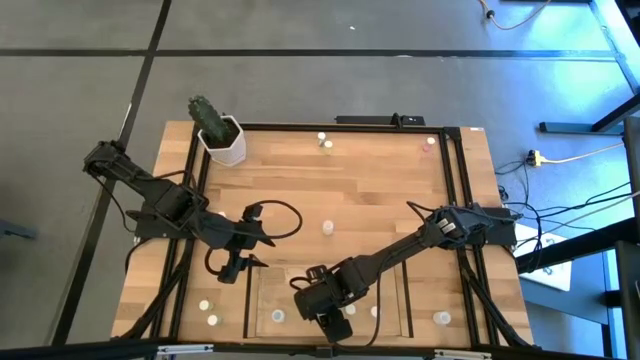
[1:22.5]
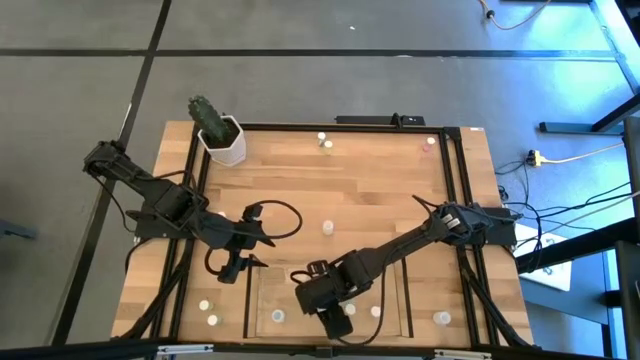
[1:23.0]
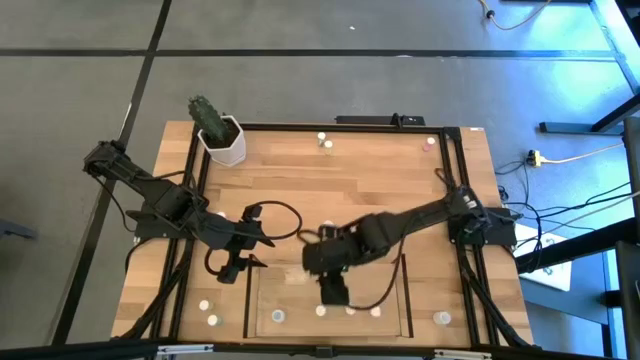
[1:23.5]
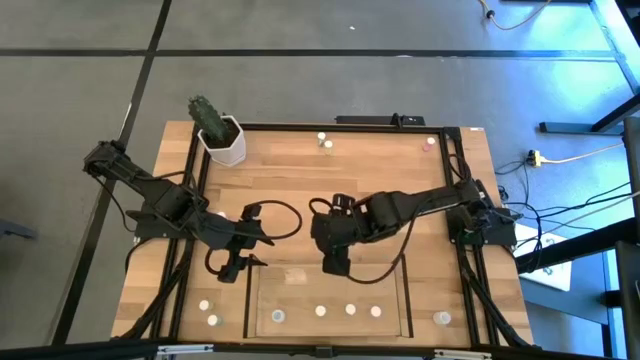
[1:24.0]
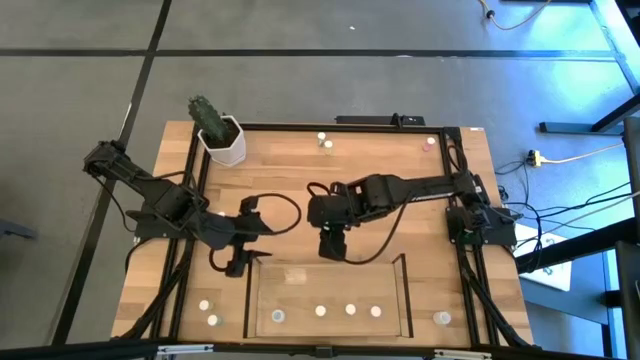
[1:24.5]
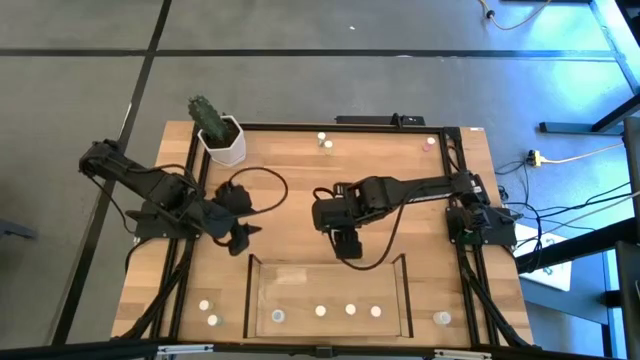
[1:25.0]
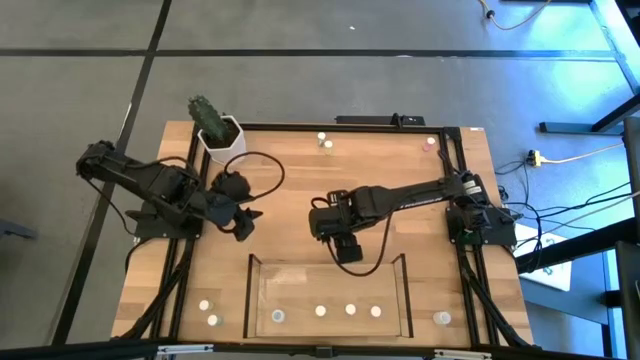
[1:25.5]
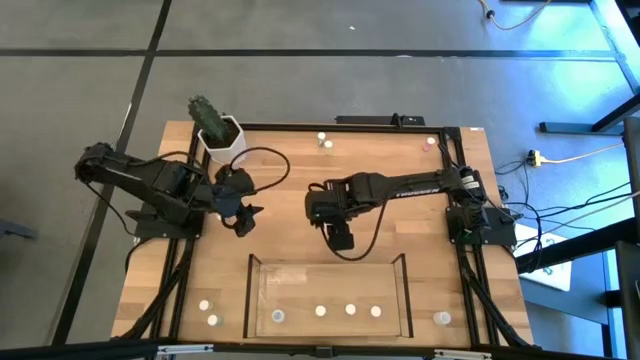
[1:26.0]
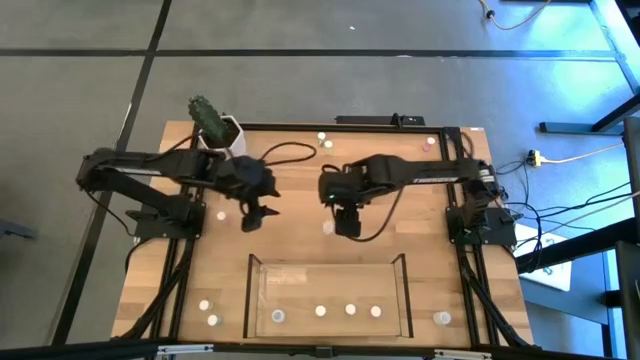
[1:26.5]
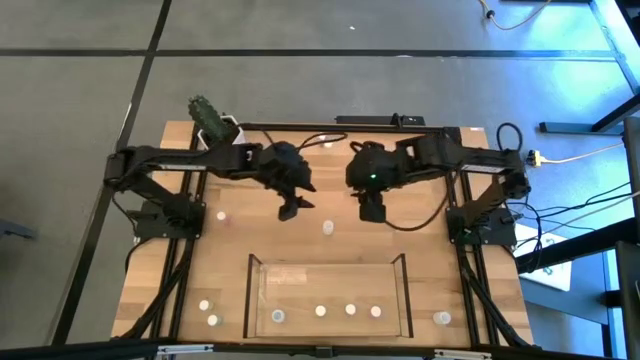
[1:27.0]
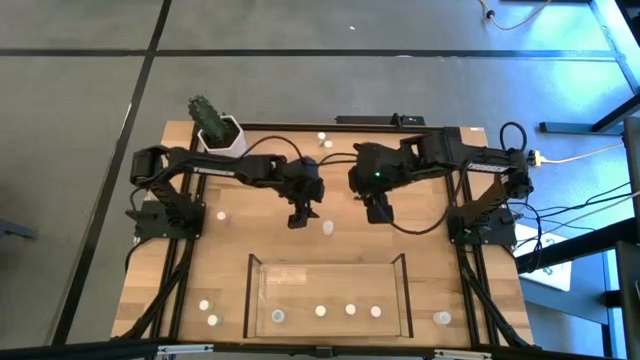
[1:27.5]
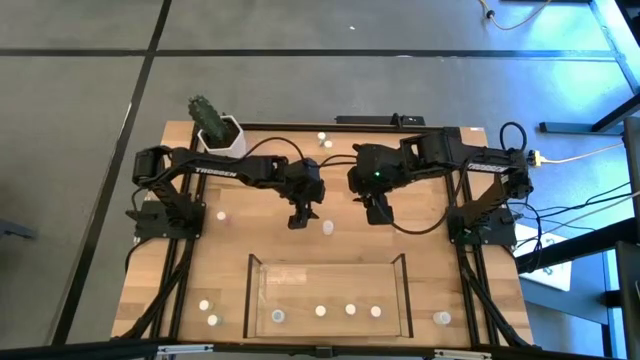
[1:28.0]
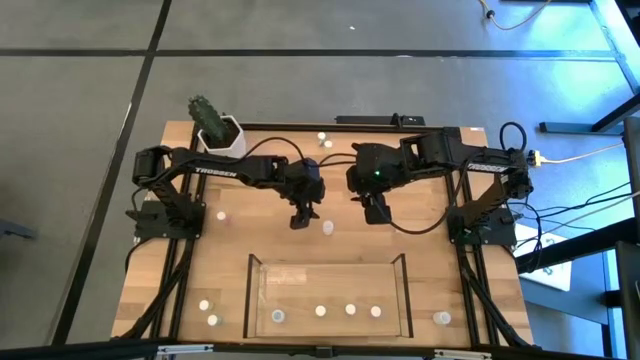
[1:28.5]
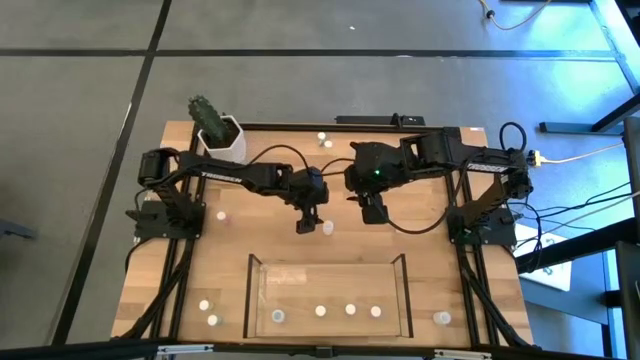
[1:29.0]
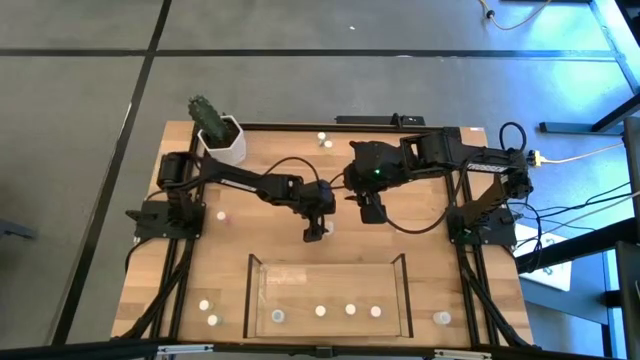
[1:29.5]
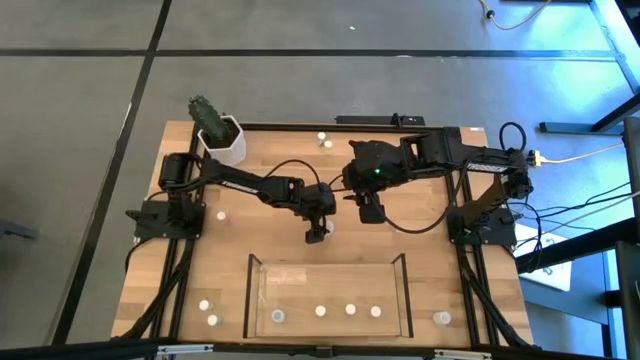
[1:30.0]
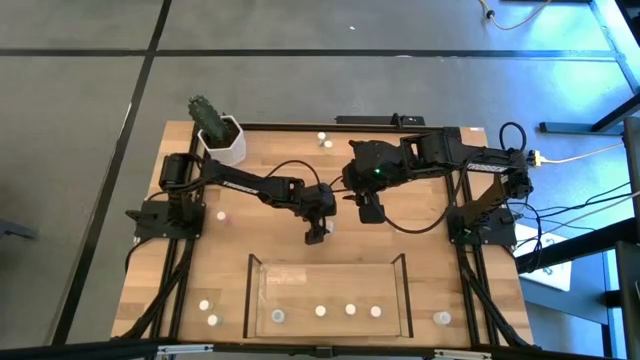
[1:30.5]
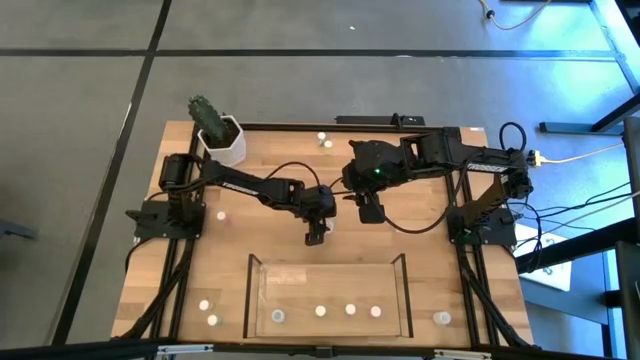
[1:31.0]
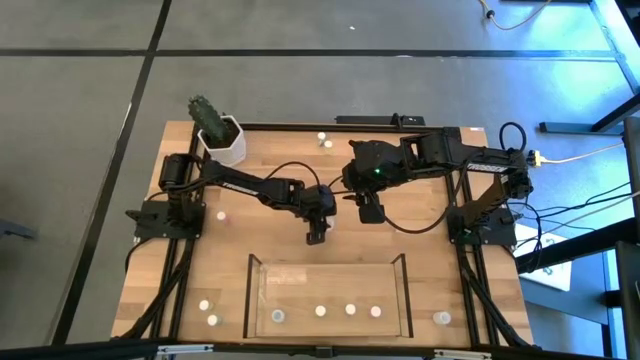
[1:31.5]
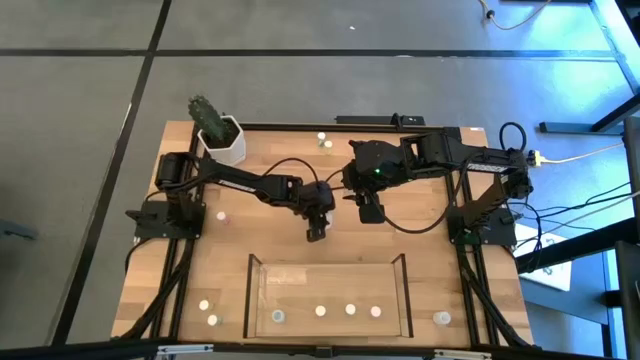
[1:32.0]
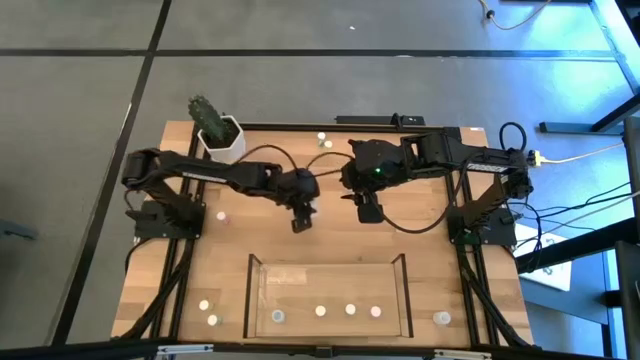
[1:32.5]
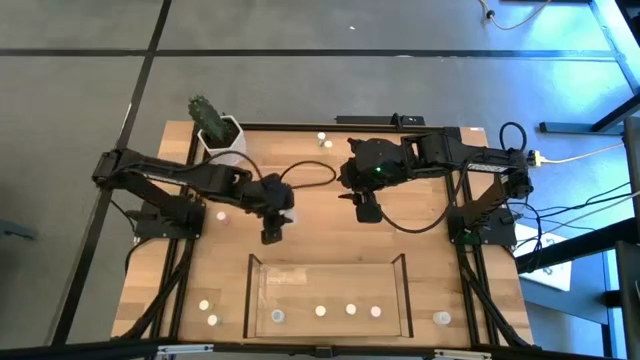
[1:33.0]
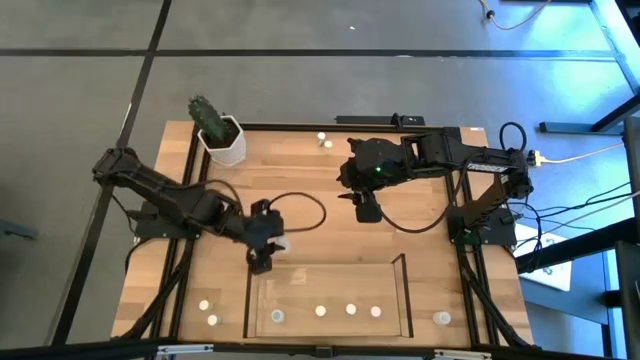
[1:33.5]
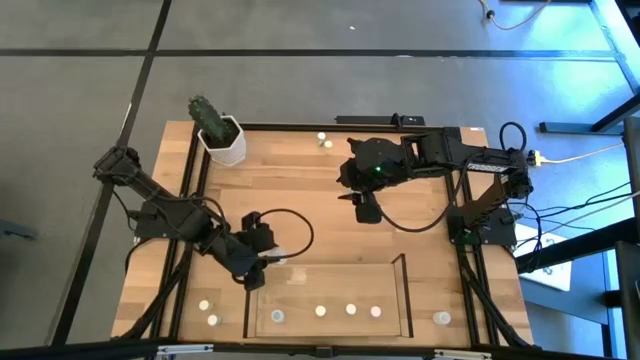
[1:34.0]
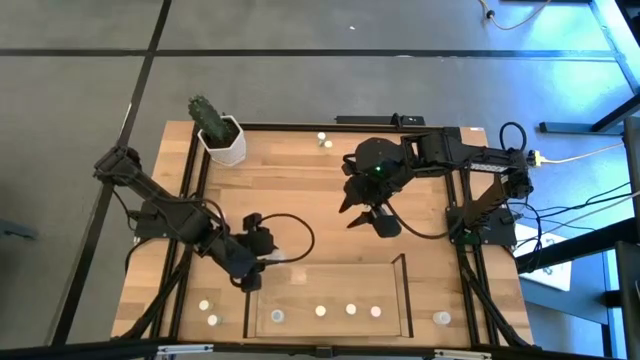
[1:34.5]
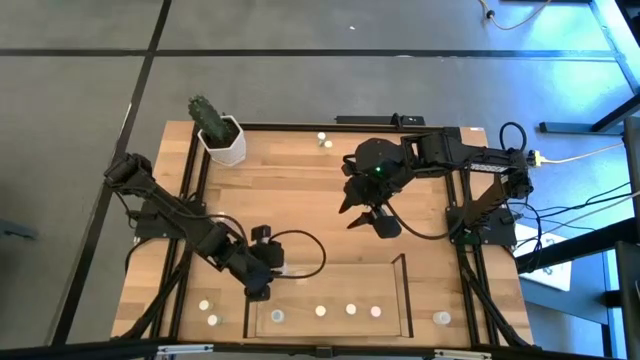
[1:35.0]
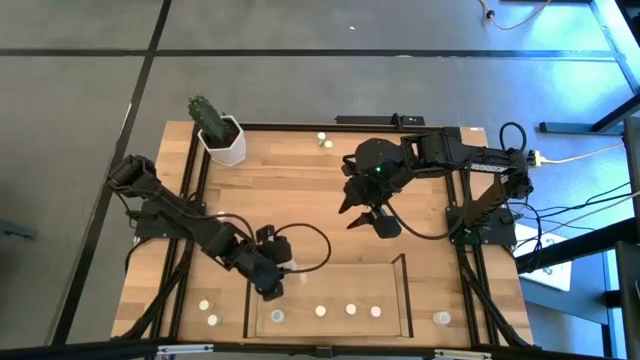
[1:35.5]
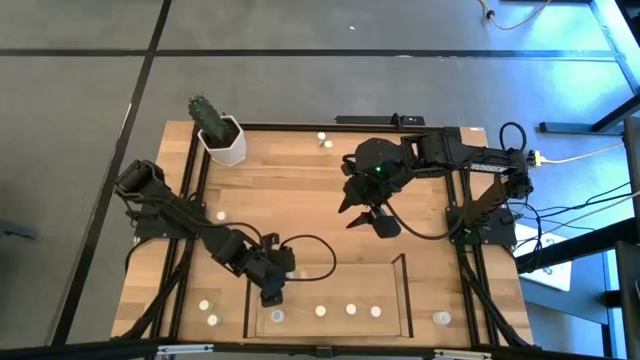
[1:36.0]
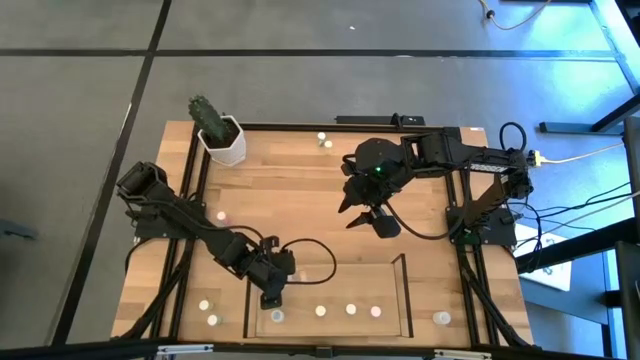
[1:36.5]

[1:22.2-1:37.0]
Task: Pick and place medicine bottles onto shelf by color
Put the top white pill bottle on the shelf

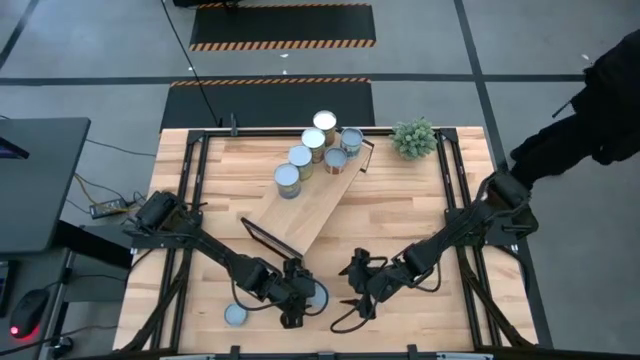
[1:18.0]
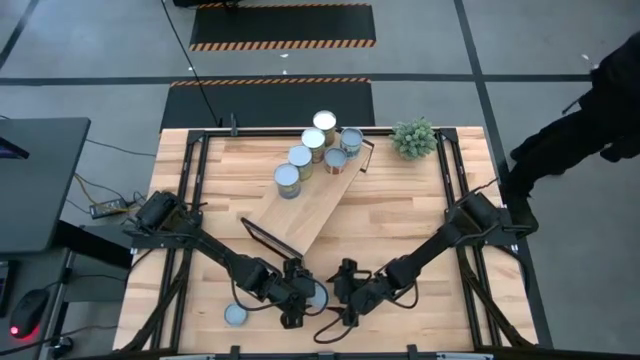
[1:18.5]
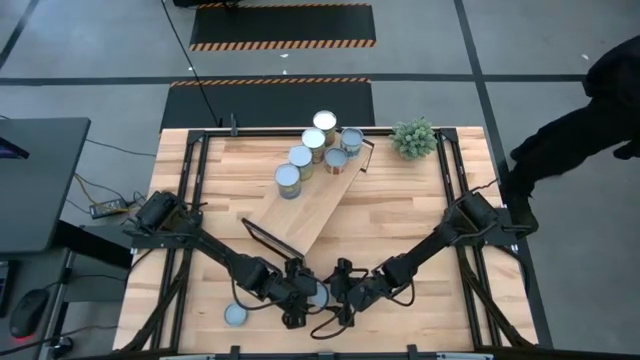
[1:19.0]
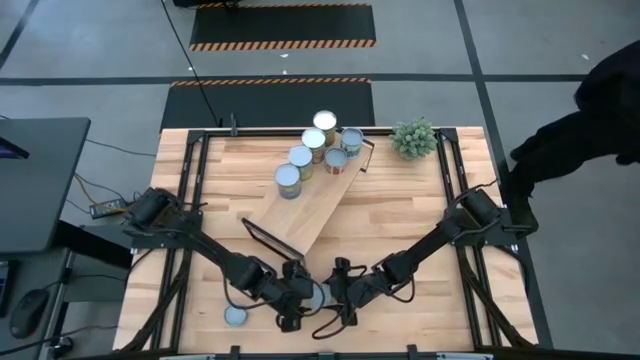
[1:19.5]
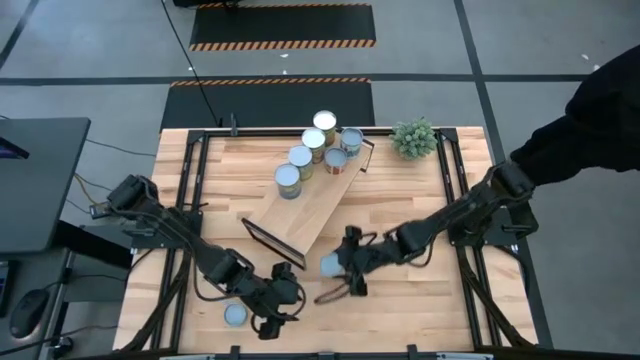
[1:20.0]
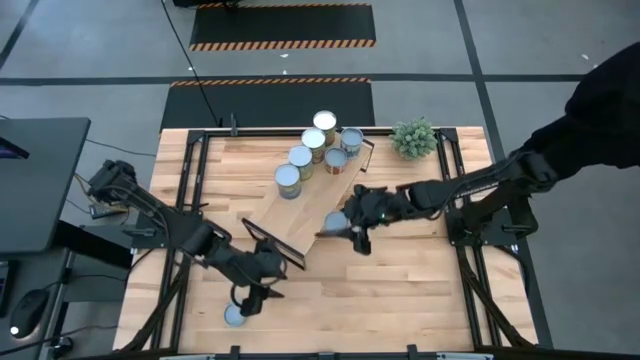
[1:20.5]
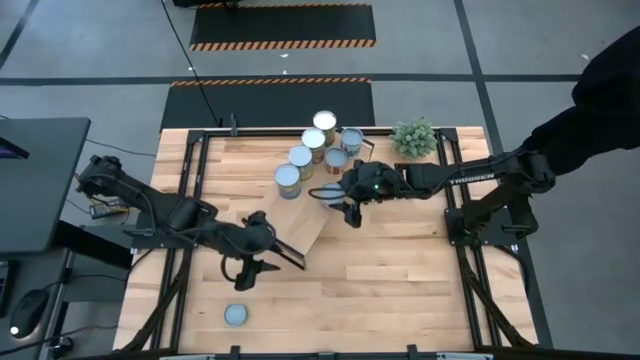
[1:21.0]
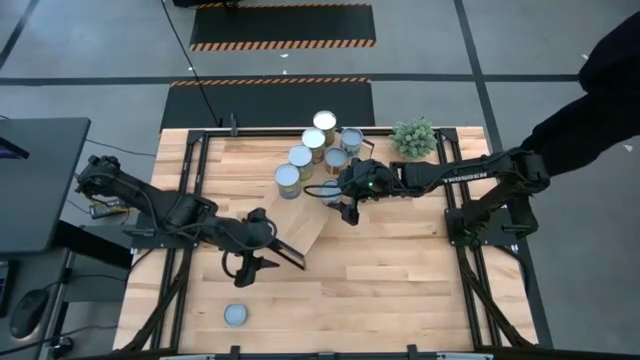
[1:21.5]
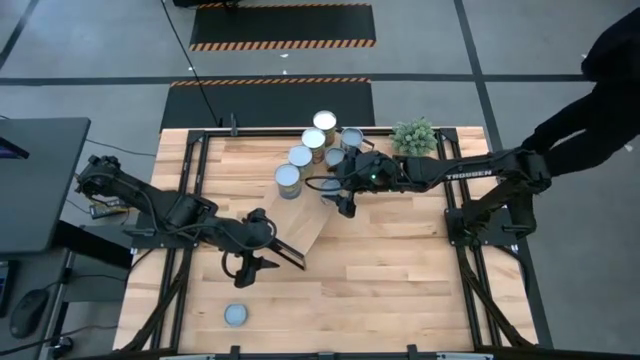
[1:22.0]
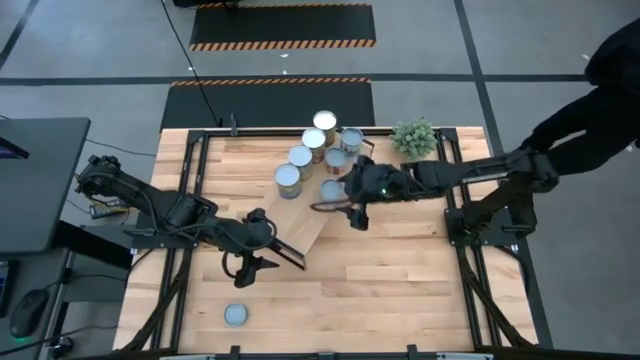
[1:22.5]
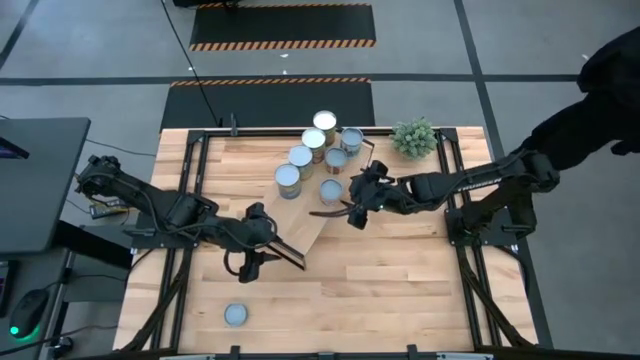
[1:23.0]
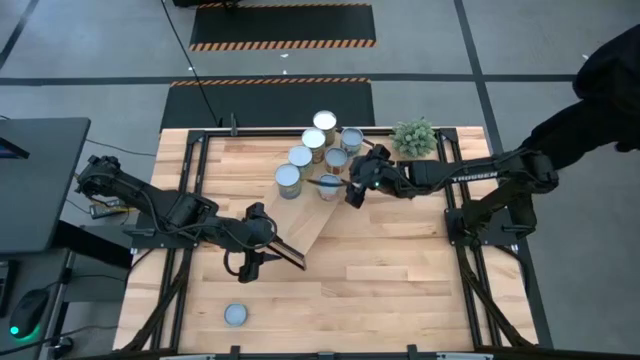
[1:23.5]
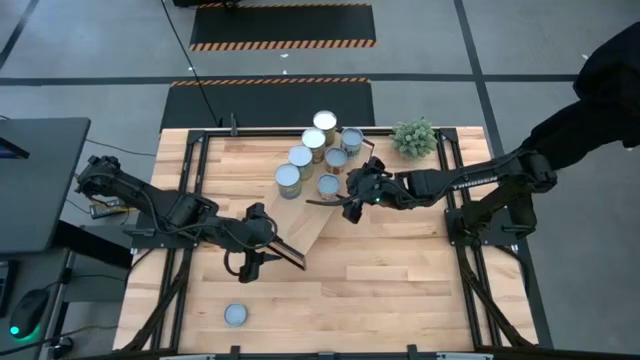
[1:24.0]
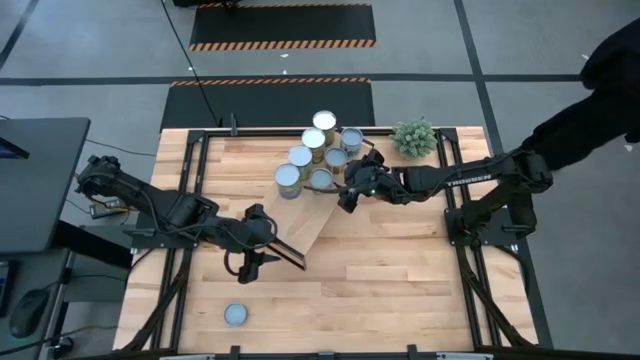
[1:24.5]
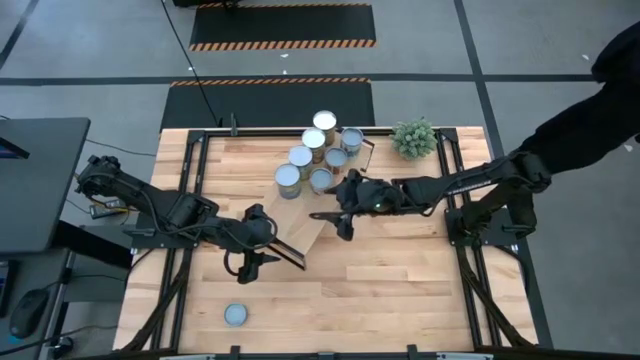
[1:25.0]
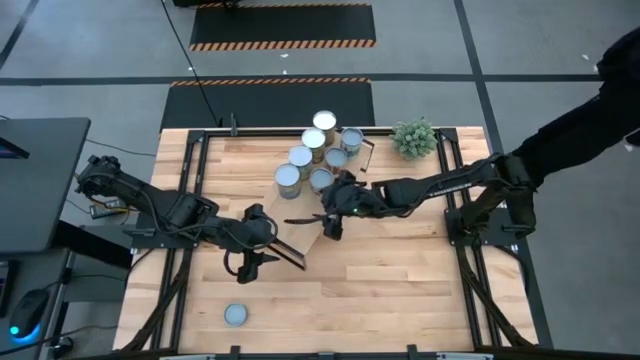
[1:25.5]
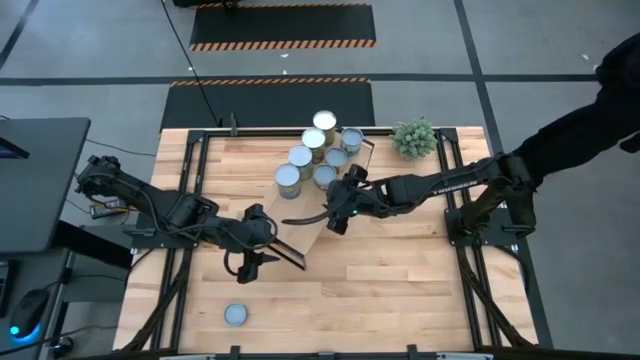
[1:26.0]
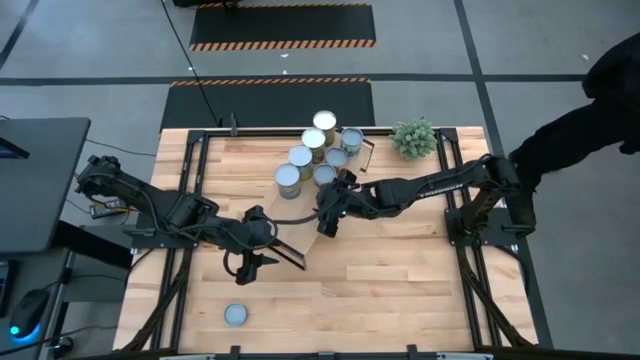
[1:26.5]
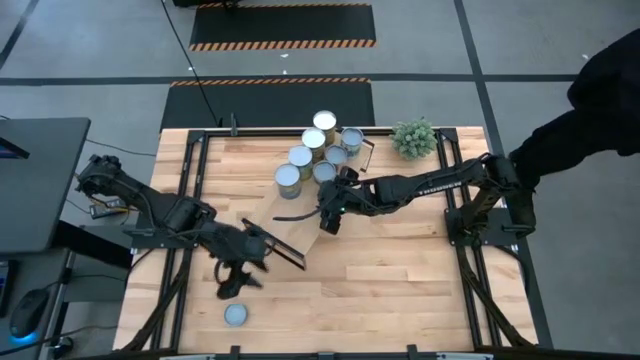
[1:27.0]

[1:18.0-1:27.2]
Task: Pick and place cans onto a shelf
Put the canned peas on the shelf
